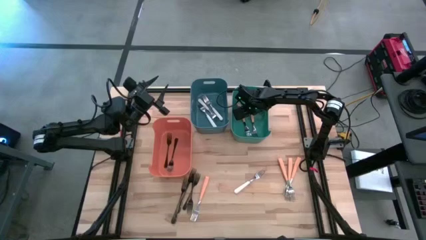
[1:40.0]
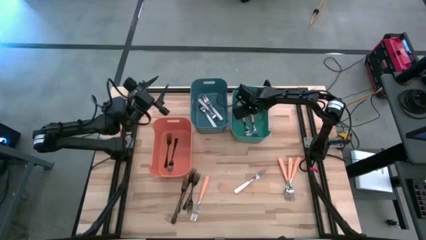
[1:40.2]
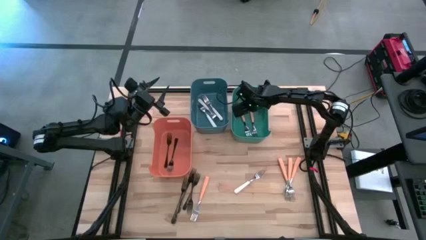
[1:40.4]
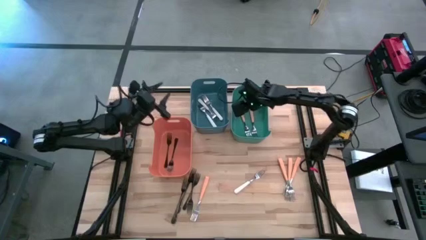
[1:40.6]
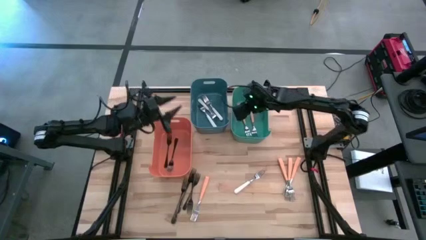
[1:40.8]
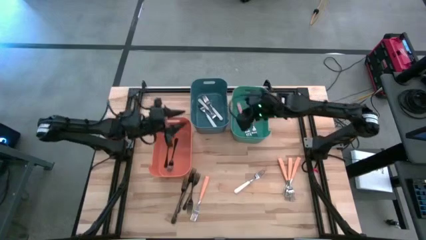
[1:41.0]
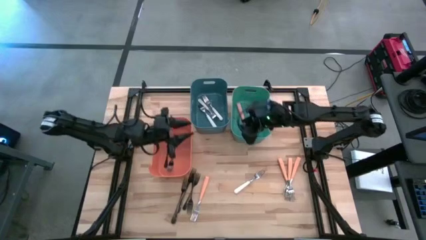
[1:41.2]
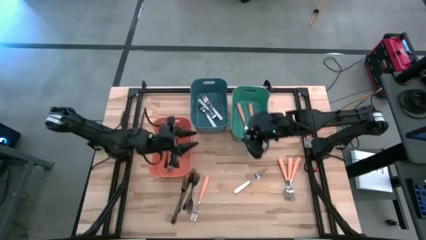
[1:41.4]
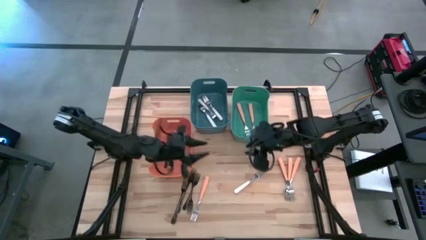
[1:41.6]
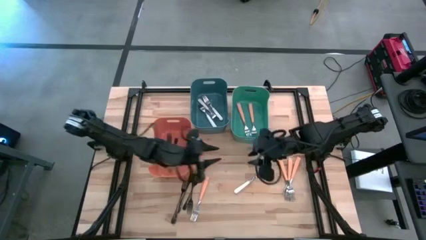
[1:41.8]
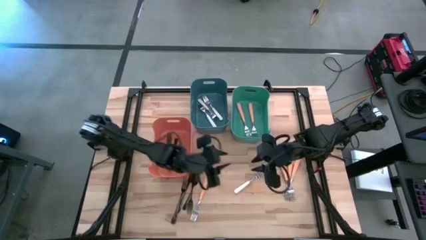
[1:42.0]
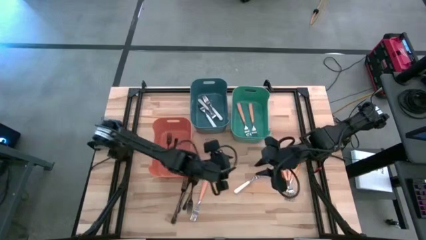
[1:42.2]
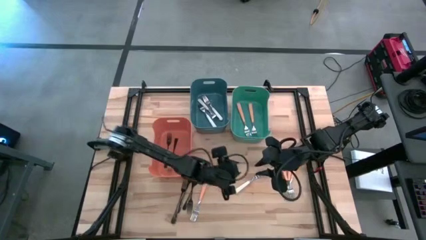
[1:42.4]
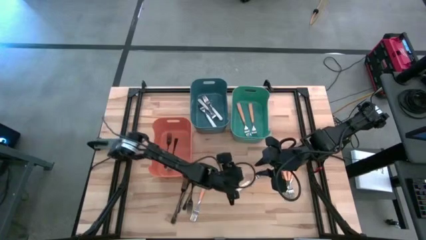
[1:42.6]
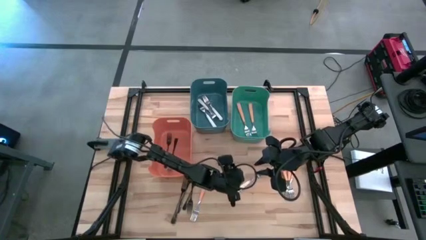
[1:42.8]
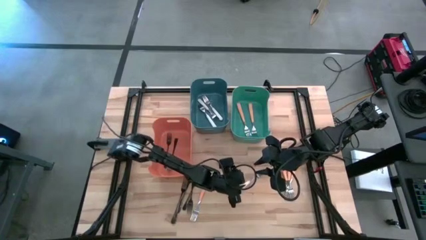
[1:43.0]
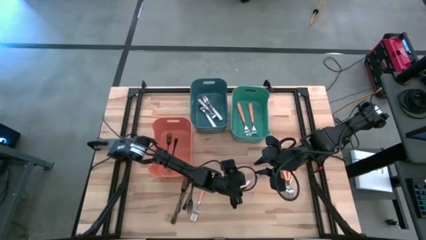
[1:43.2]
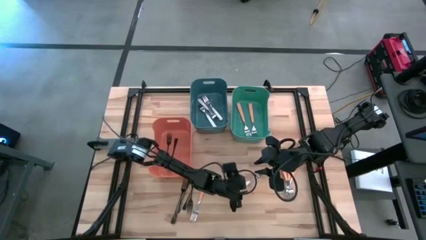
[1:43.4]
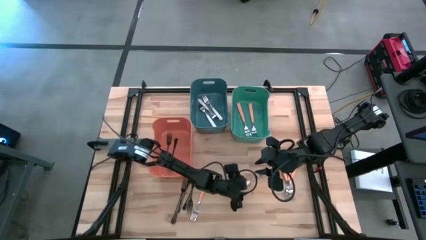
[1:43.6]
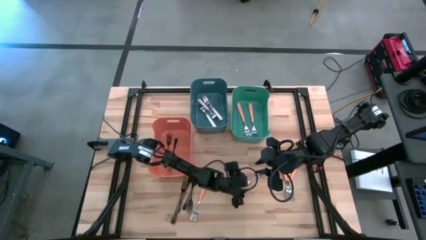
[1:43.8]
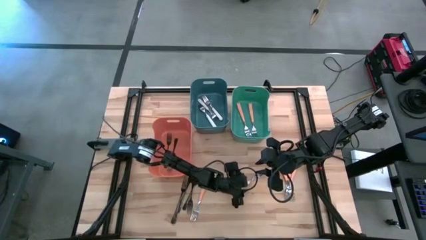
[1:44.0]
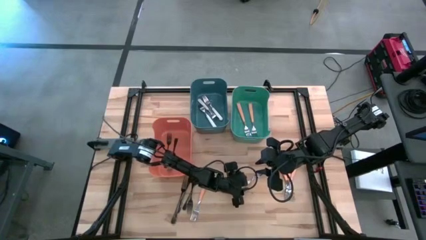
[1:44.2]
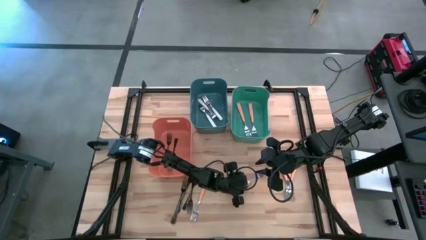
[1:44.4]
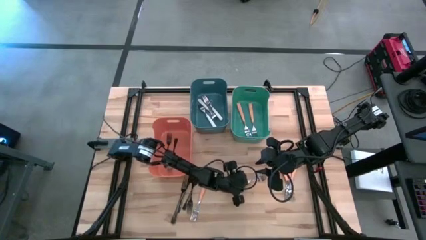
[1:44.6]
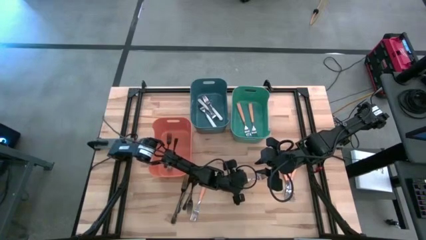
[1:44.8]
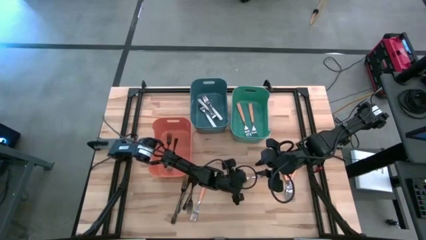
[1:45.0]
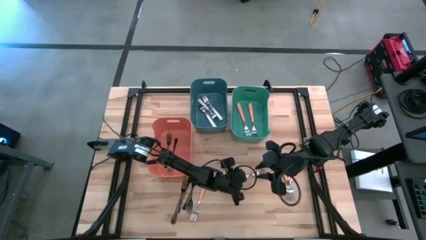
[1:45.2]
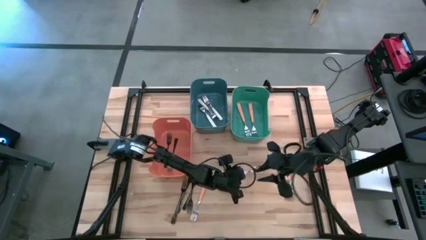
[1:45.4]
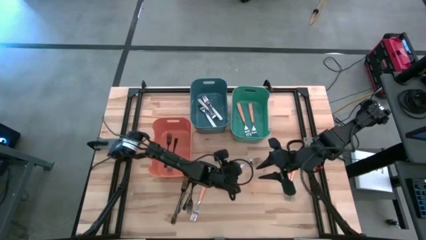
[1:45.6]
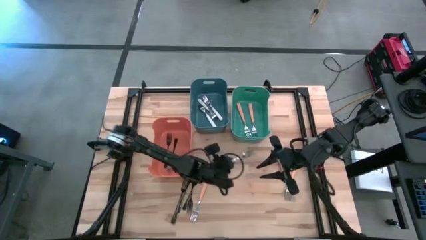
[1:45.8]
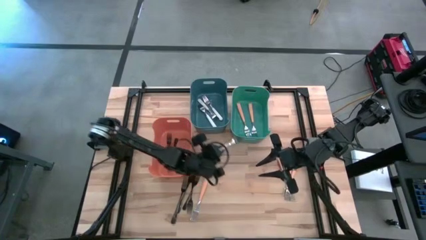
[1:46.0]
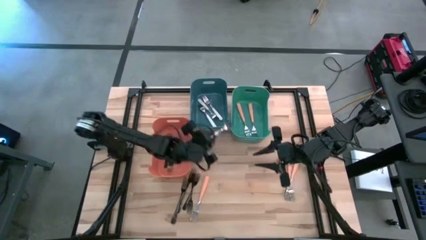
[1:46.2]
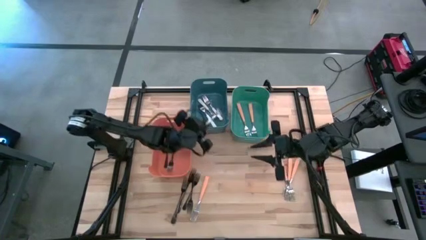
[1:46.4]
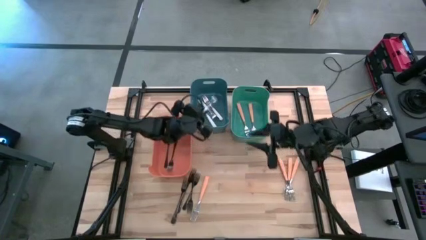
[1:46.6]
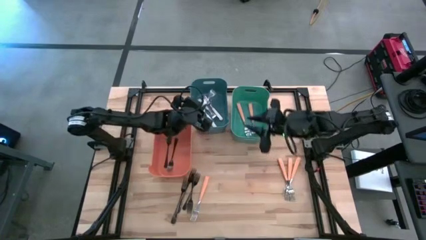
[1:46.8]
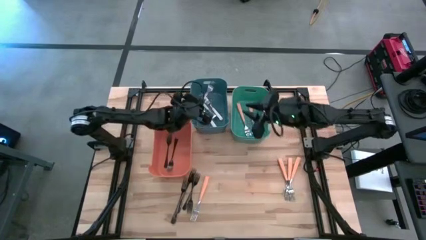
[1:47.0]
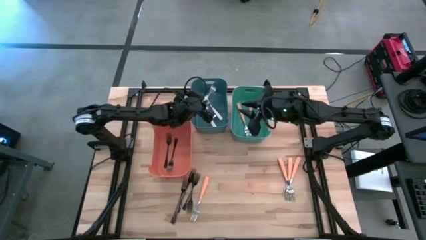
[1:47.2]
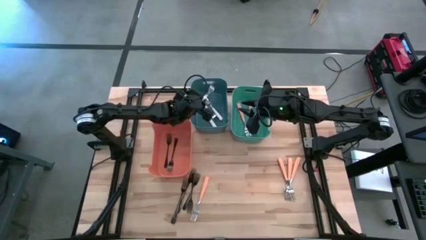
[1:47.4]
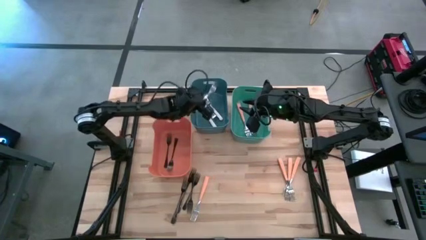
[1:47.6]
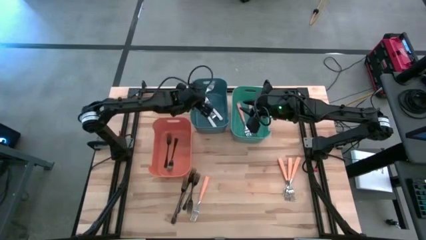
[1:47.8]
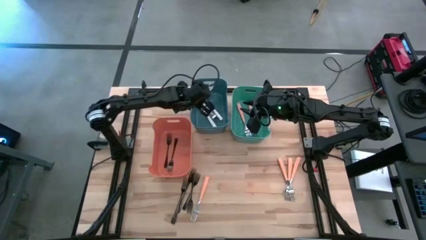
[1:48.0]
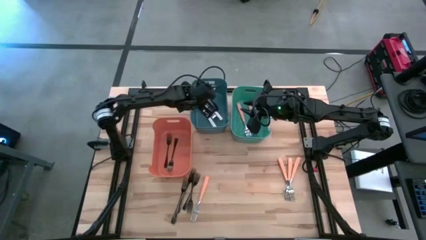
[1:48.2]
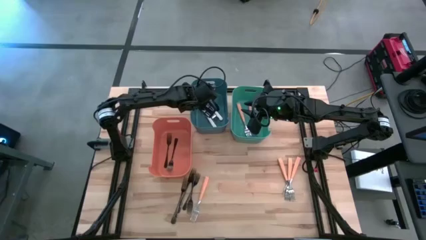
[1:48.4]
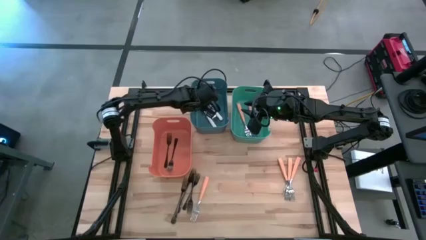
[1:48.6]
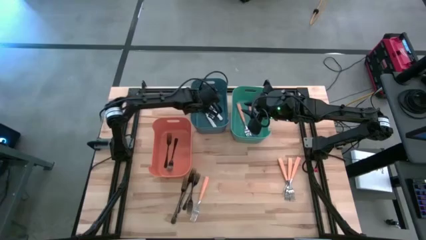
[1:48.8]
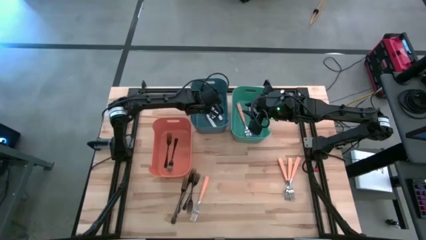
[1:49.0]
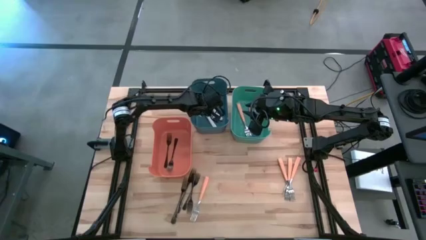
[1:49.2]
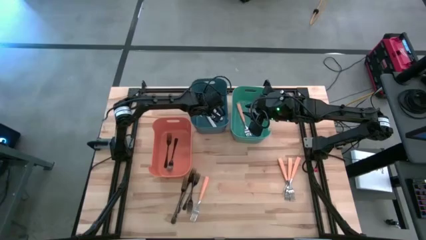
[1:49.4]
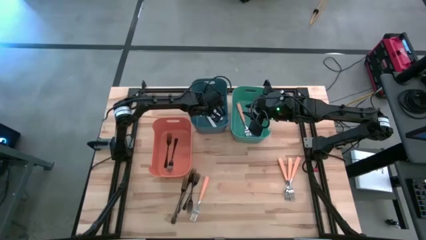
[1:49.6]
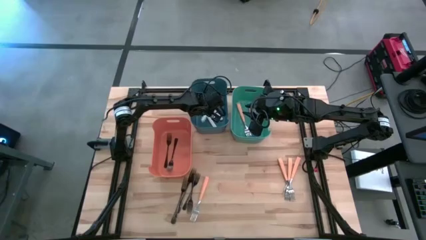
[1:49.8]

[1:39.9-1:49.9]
Task: Sort silverware by color (type)
Put the white fork into the blue bin
